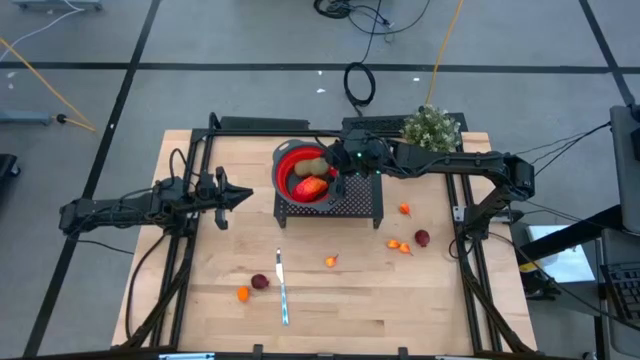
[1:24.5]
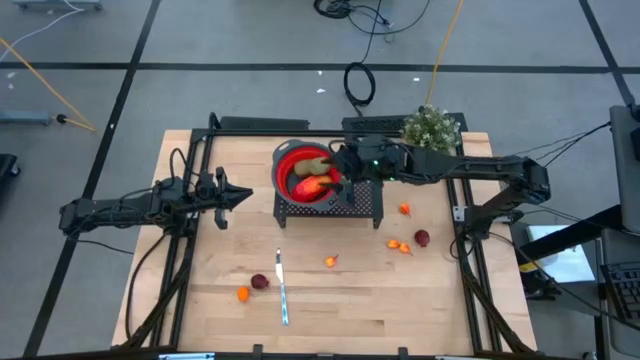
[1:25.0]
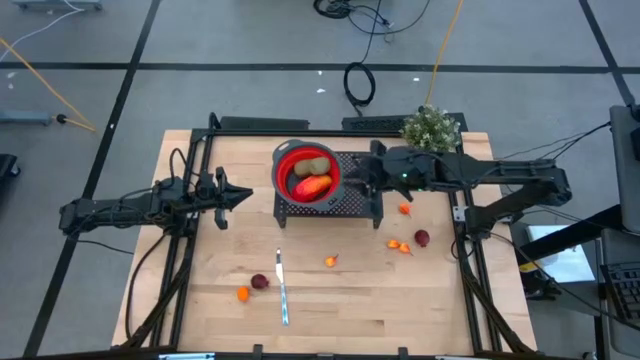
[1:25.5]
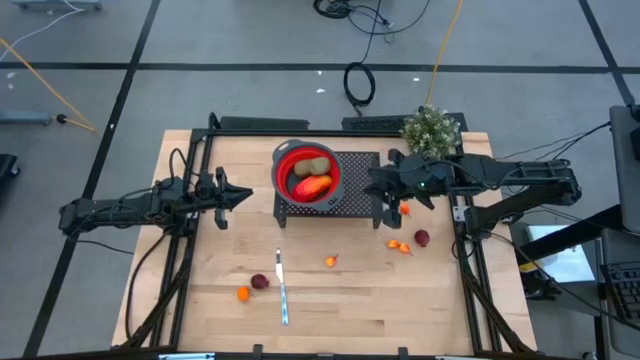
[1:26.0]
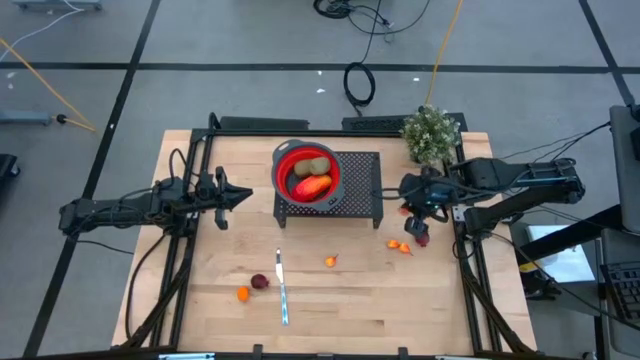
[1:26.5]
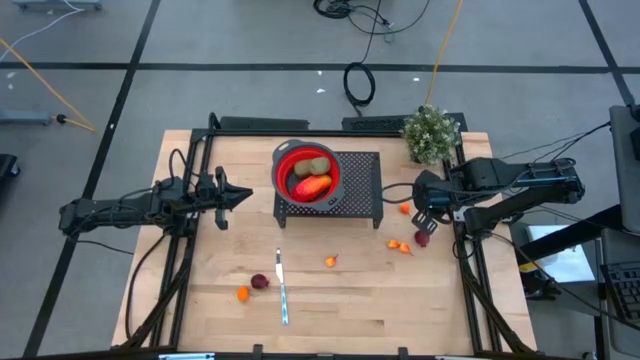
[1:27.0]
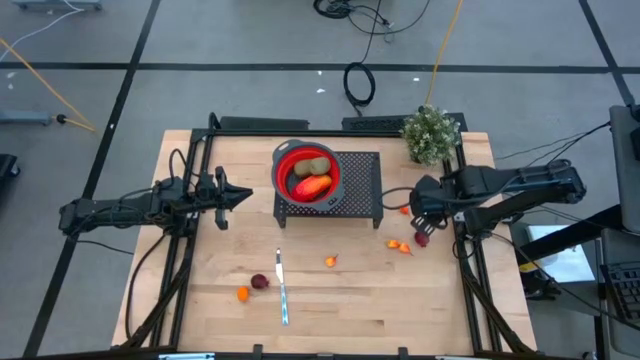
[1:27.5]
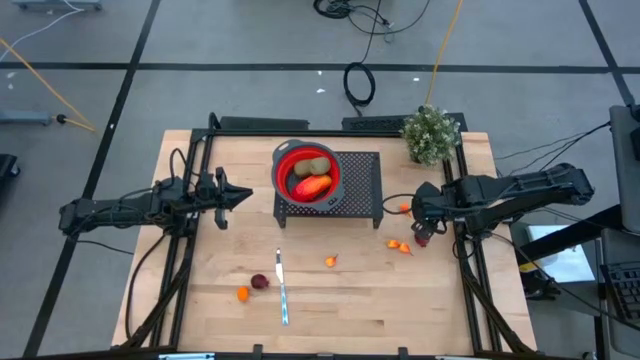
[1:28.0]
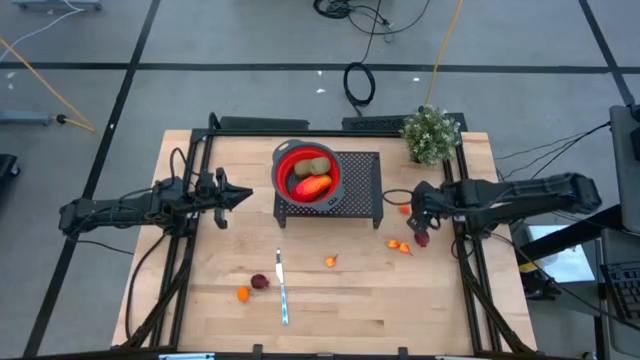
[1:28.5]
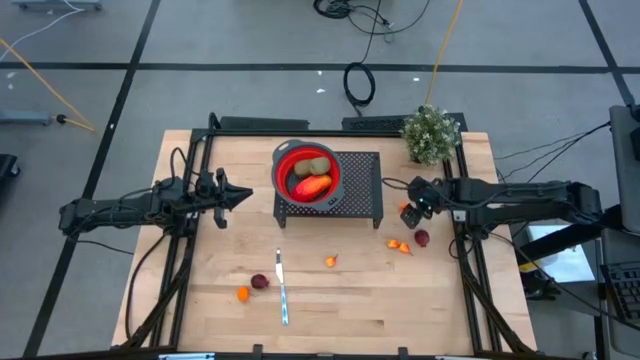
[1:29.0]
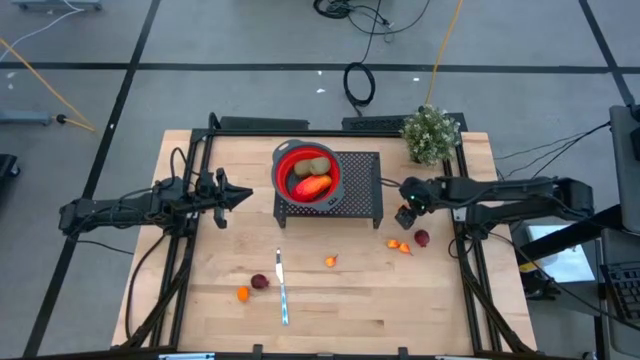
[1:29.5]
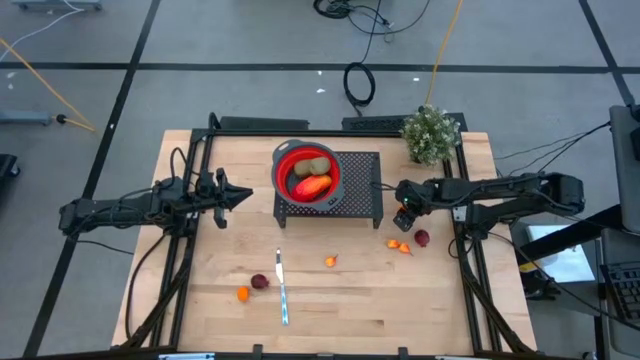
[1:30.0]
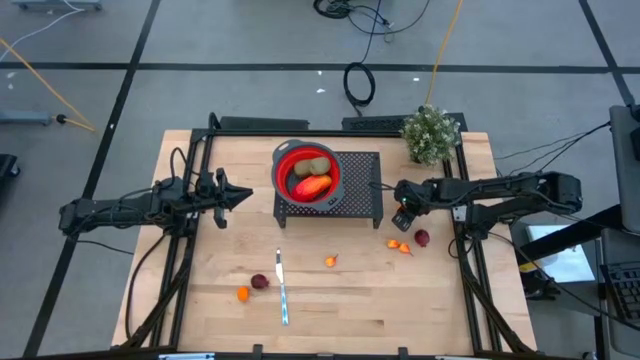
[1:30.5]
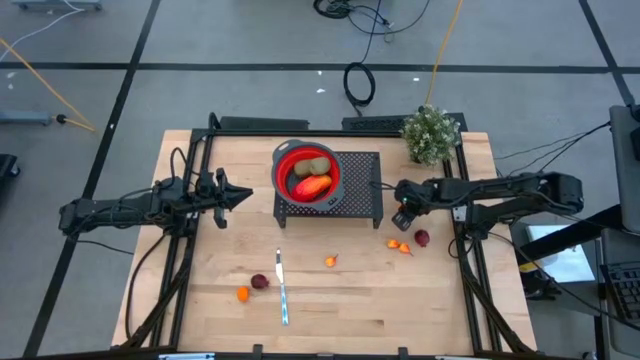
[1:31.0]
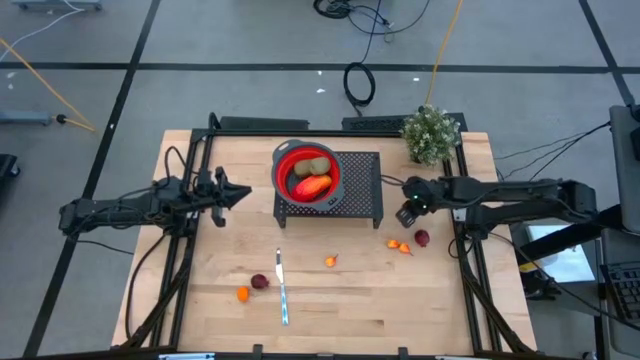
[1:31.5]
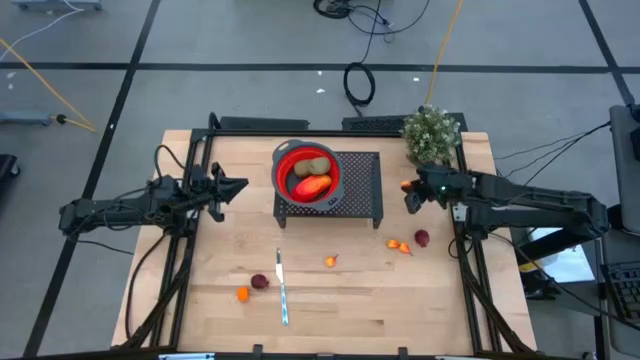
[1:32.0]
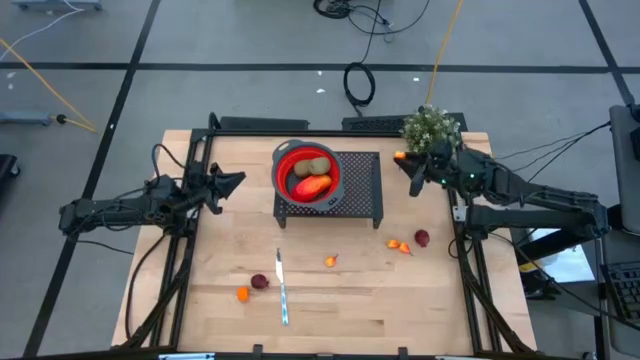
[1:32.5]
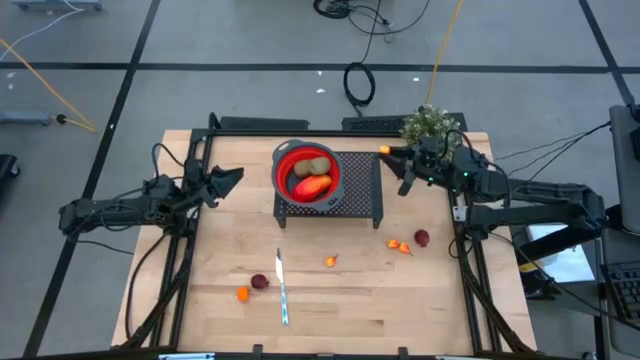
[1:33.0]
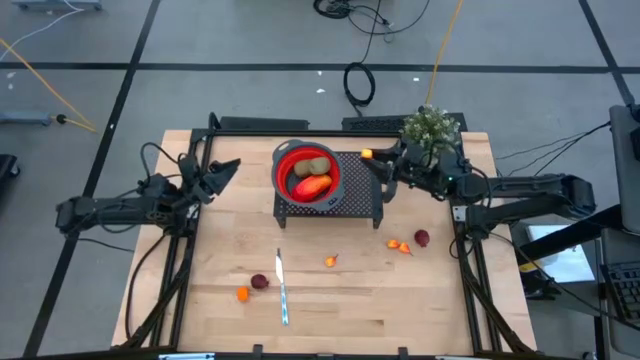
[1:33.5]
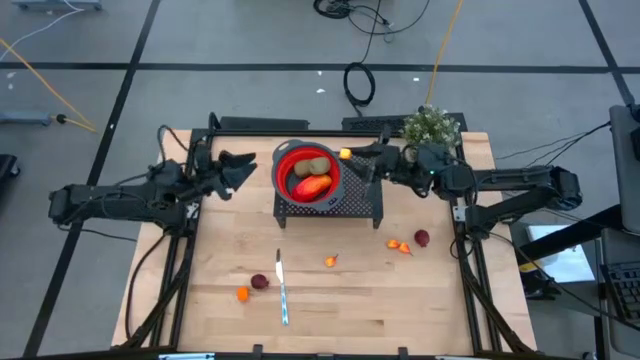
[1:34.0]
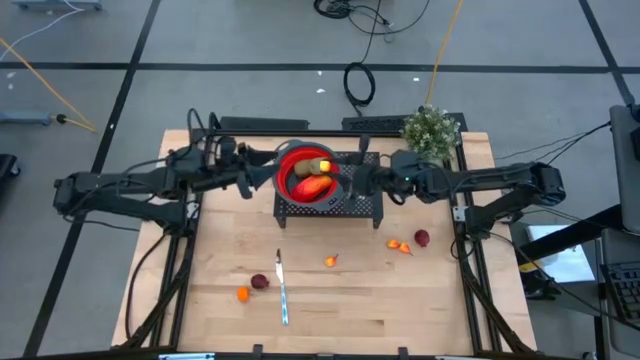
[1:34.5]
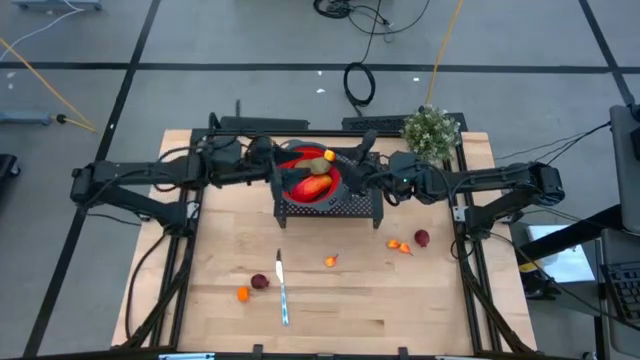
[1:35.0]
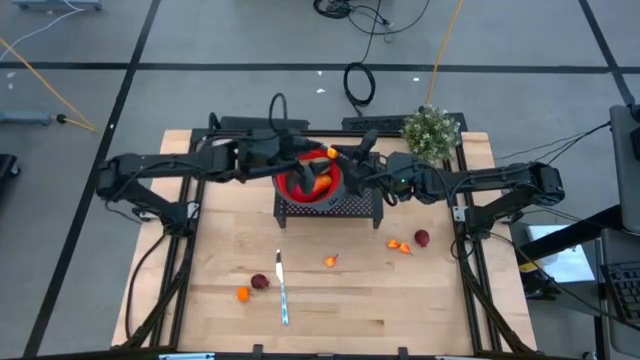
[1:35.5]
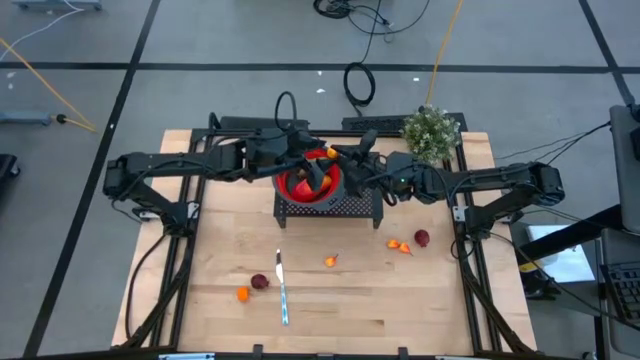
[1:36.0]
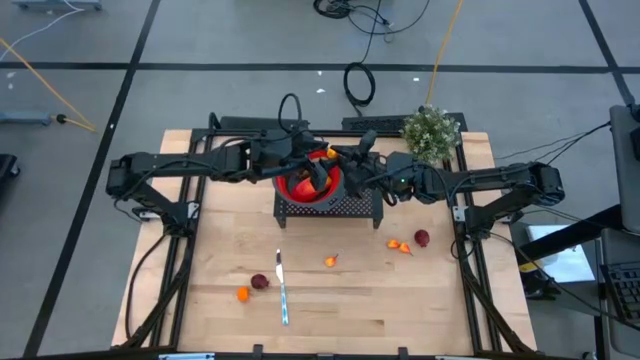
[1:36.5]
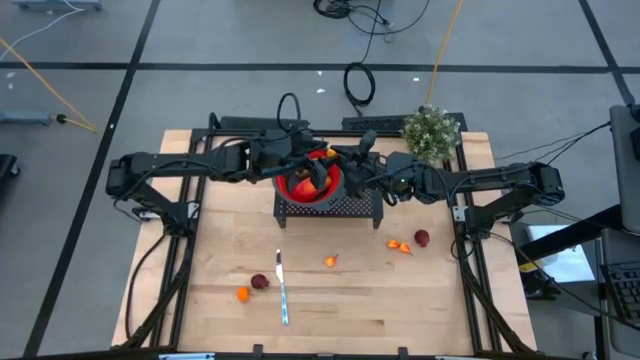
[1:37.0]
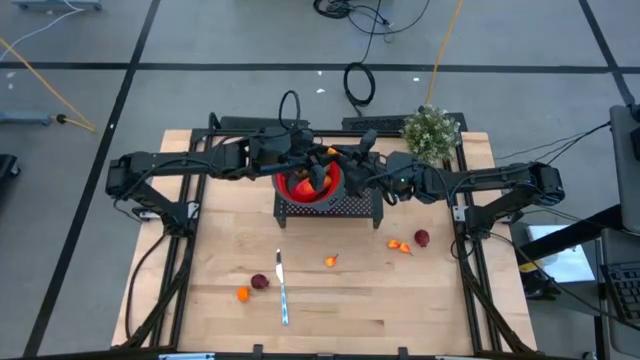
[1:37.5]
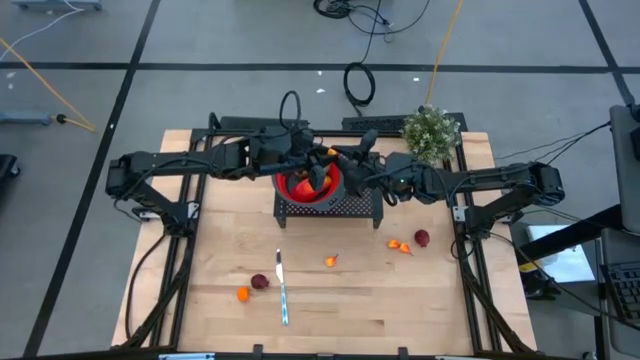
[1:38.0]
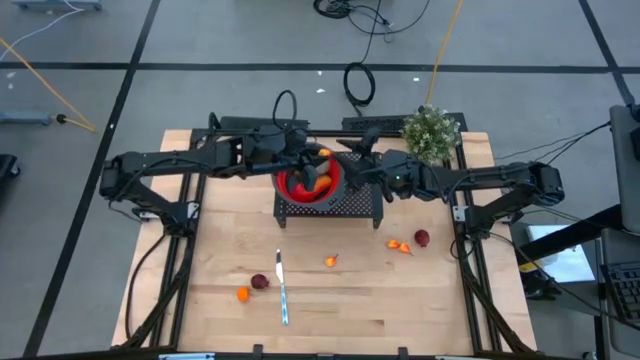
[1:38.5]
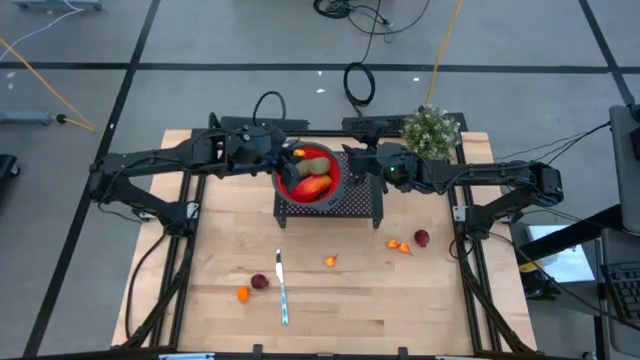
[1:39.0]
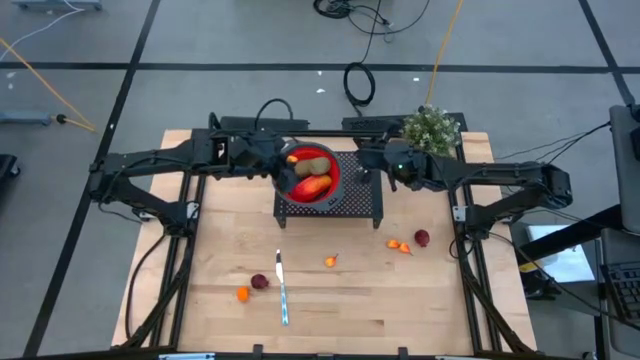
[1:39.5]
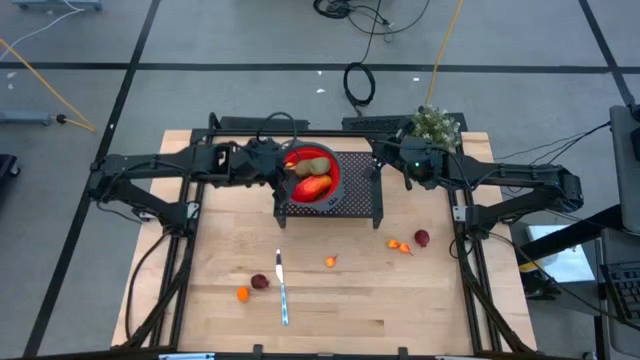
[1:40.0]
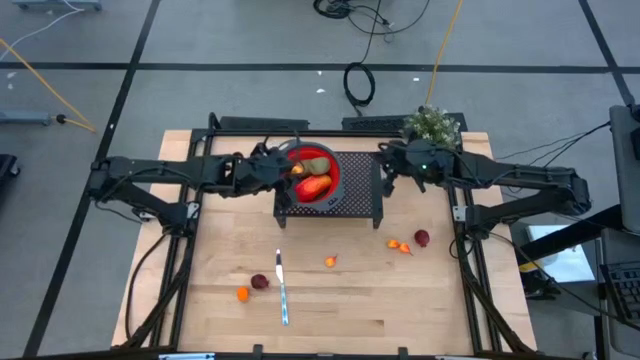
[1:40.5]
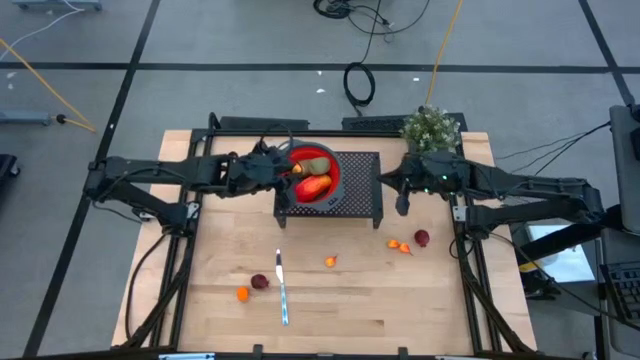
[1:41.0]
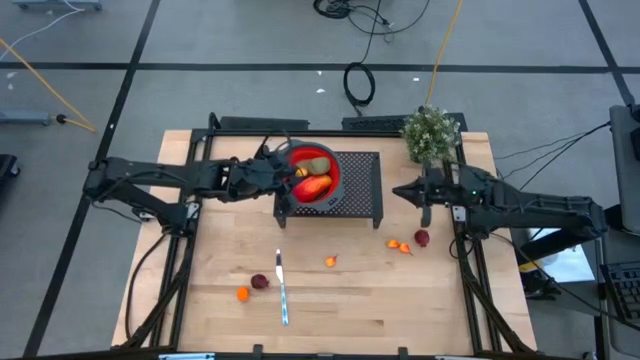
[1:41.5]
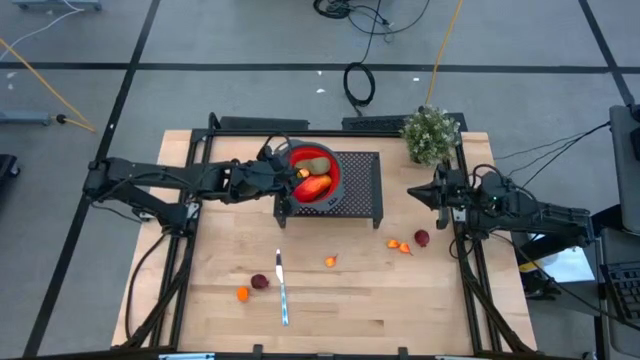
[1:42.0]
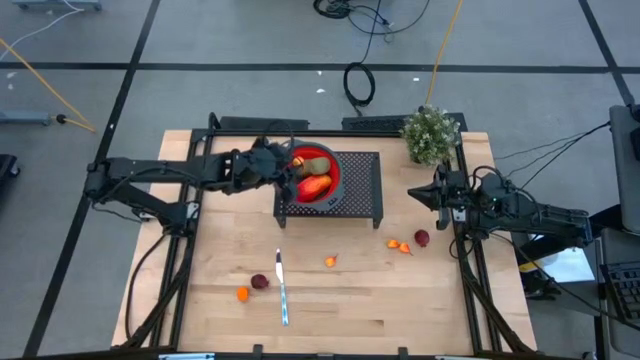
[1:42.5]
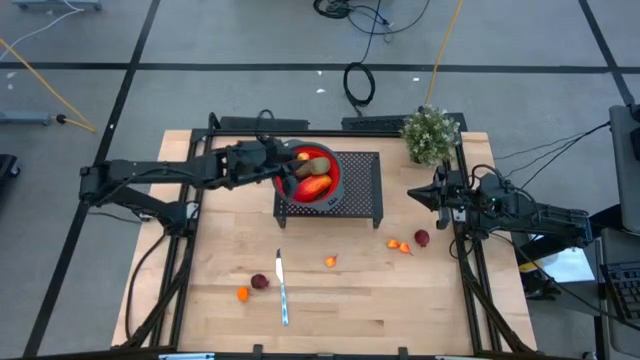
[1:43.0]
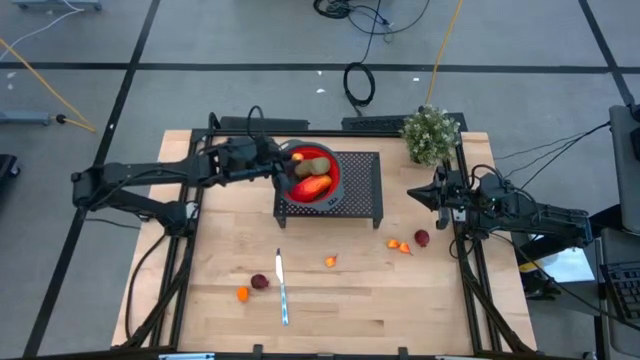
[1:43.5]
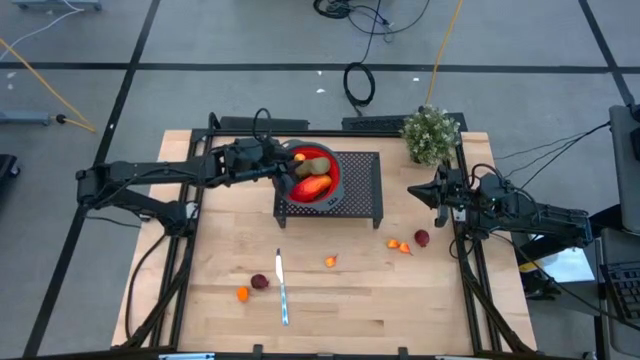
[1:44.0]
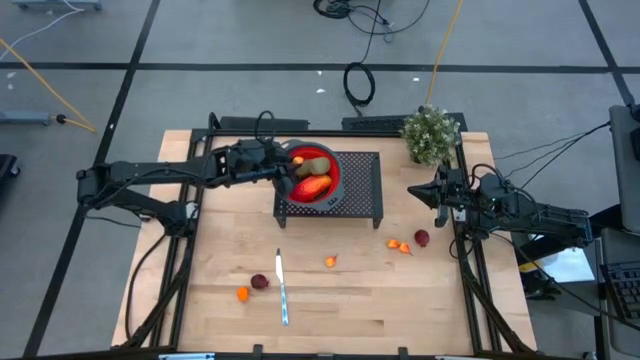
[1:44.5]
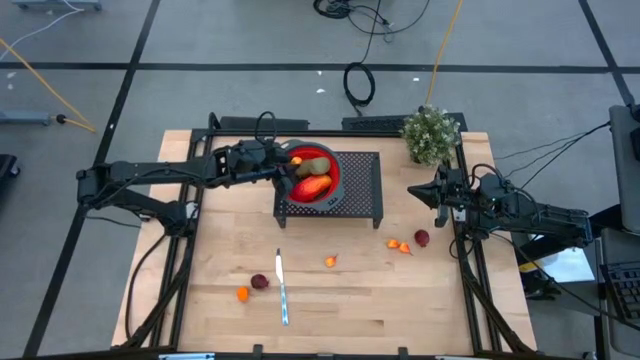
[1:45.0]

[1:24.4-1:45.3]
Task: Pick & Place Fruit
Put the top right peach into the strainer on the shelf
